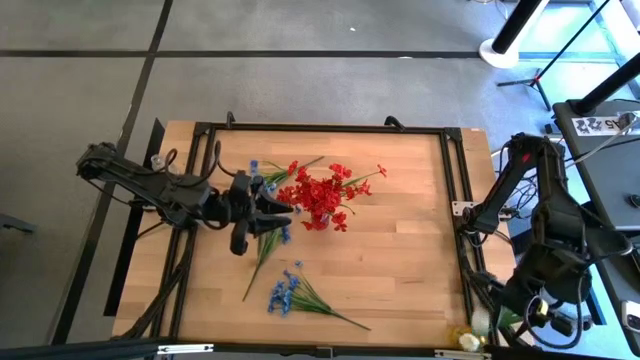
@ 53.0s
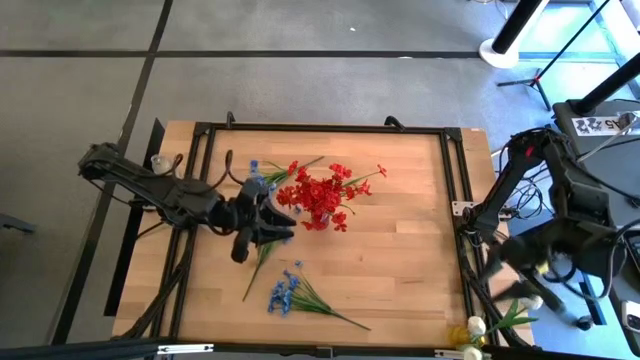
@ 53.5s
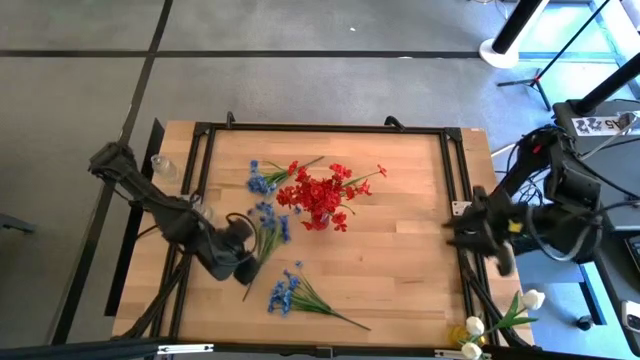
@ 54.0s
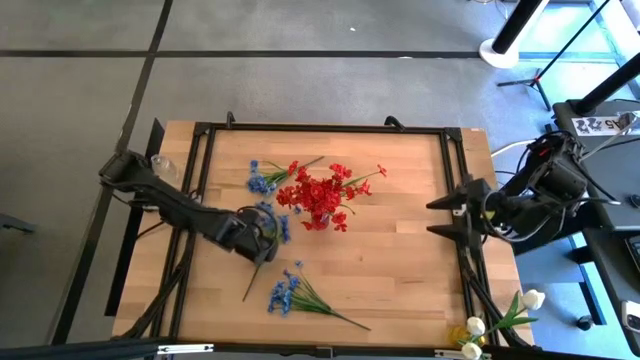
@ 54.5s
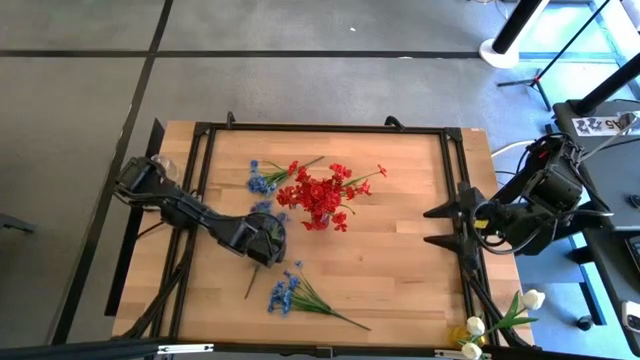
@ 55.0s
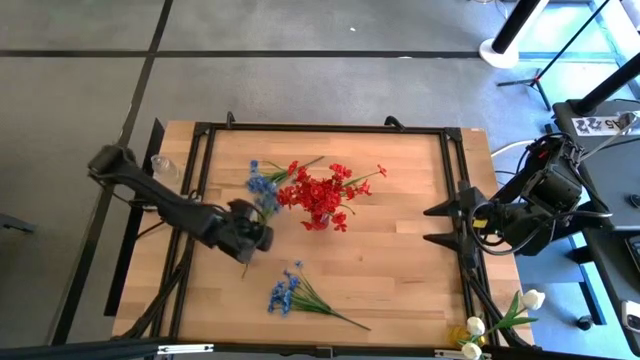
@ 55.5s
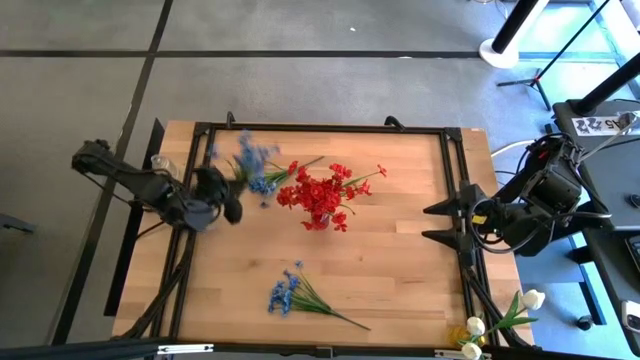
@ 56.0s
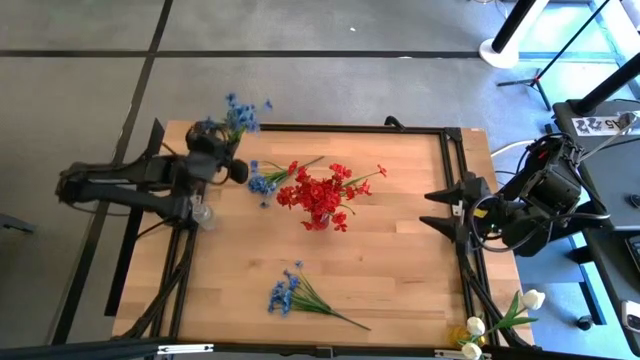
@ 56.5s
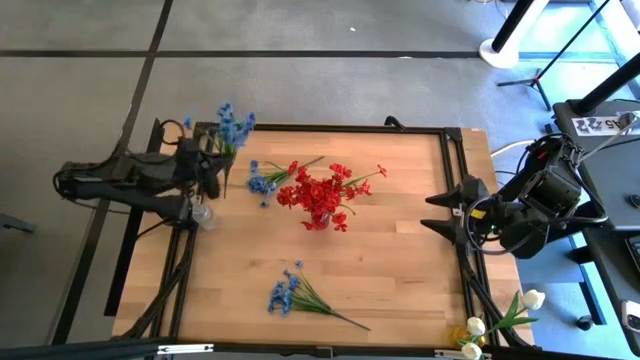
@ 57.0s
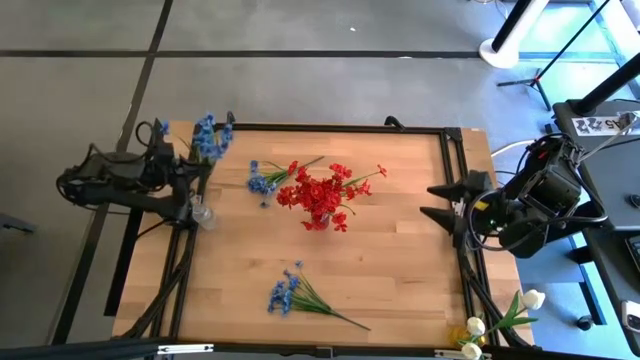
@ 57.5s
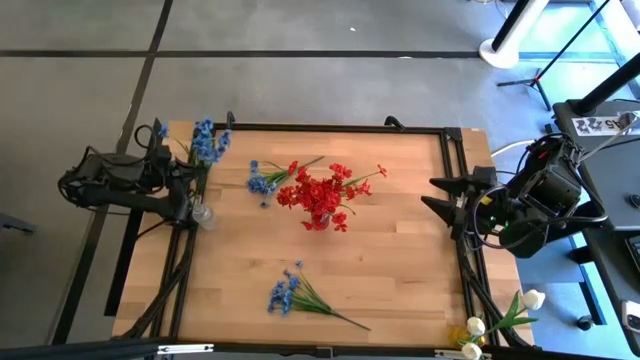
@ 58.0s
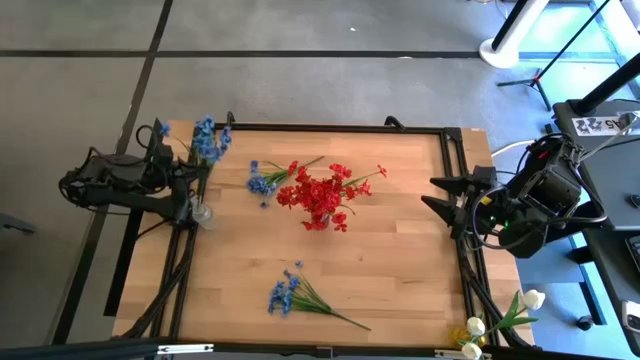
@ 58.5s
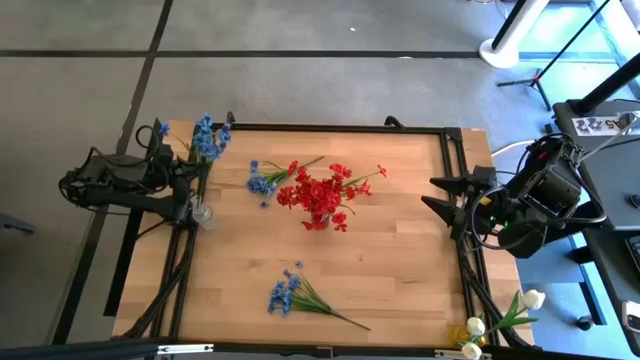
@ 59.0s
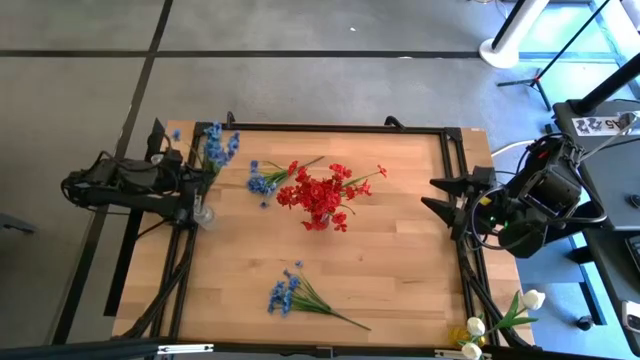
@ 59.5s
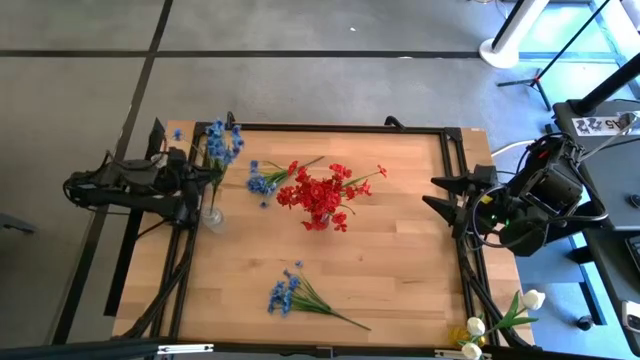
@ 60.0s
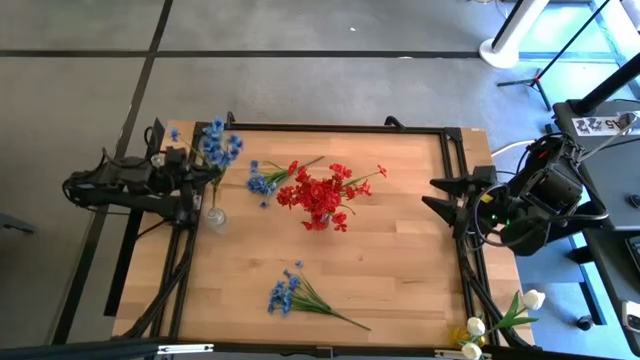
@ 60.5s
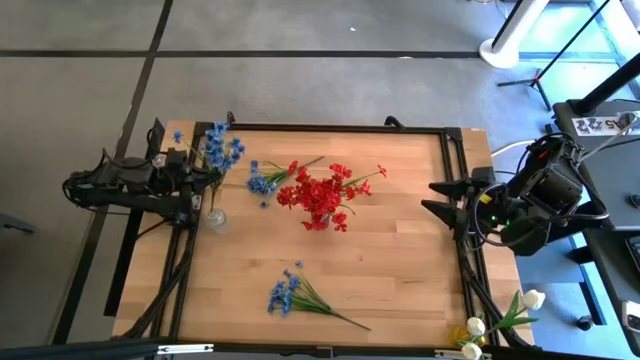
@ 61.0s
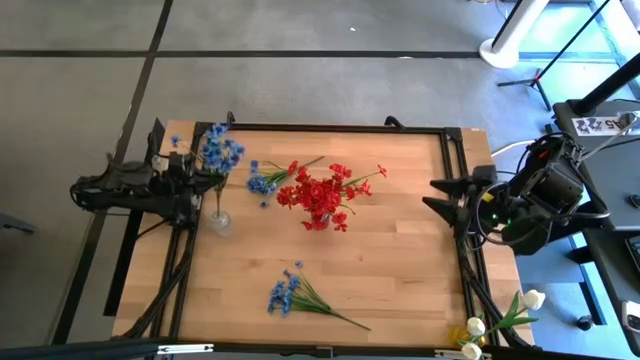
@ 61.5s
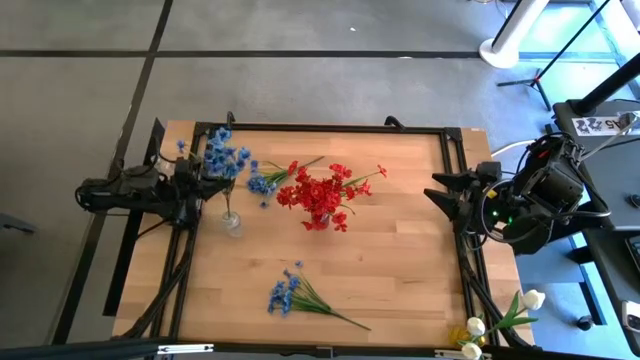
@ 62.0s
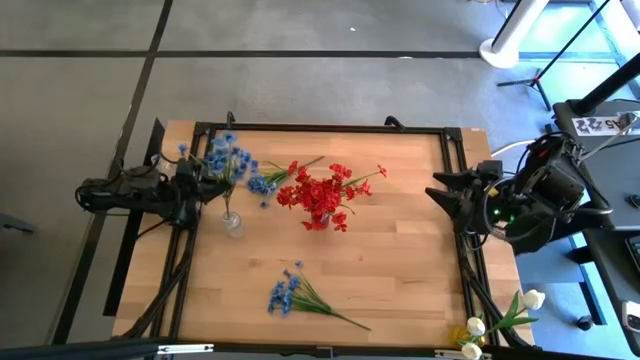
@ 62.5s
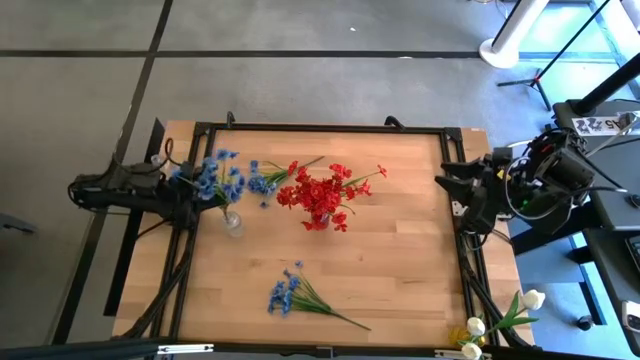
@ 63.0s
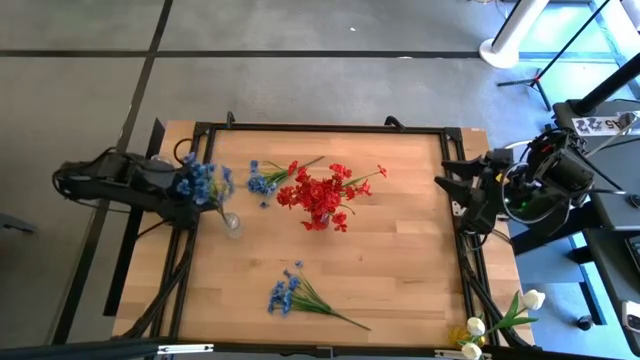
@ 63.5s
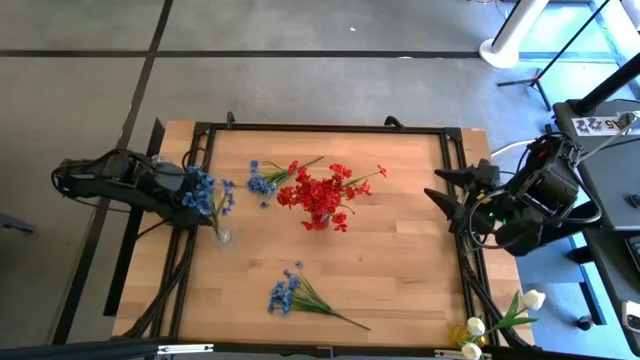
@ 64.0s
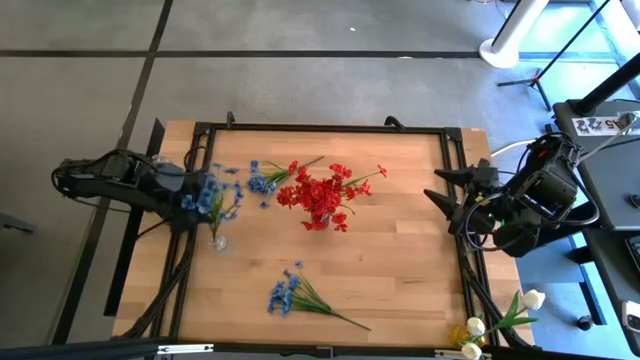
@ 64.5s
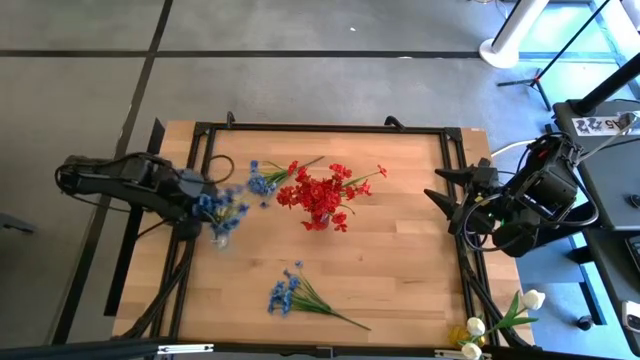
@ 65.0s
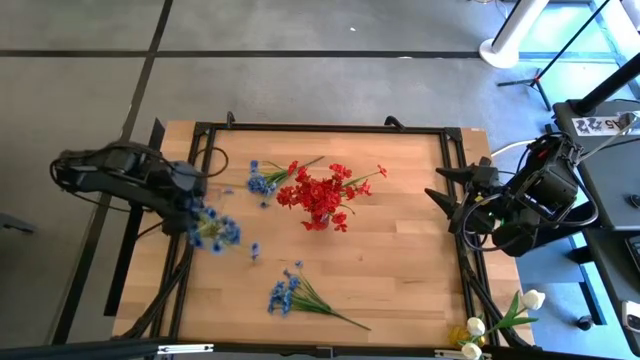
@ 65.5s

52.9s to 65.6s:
Task: Sort flowers into vase by color
Put the middle blue flowers into the transparent vase

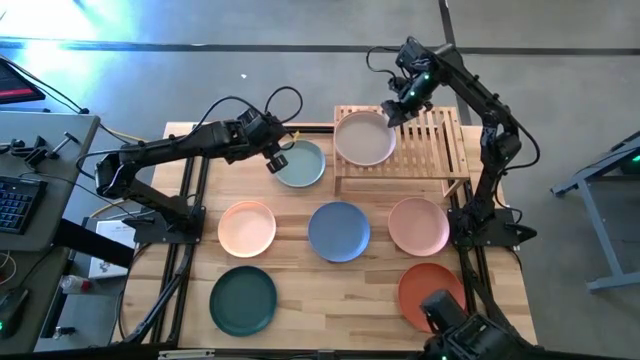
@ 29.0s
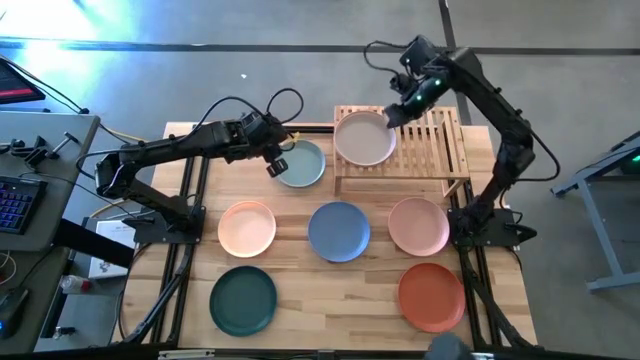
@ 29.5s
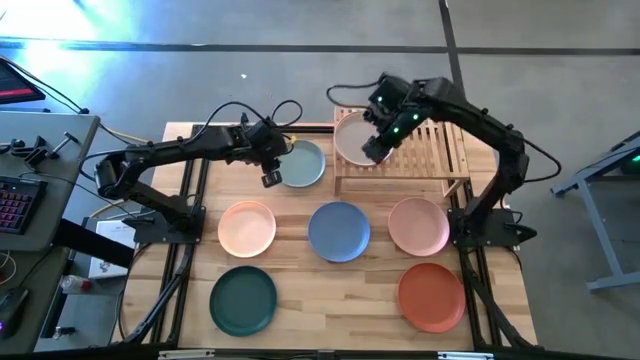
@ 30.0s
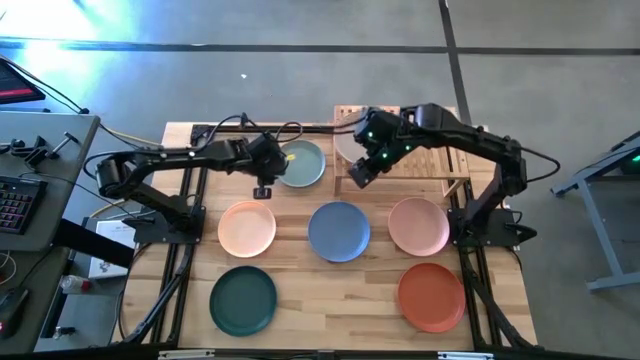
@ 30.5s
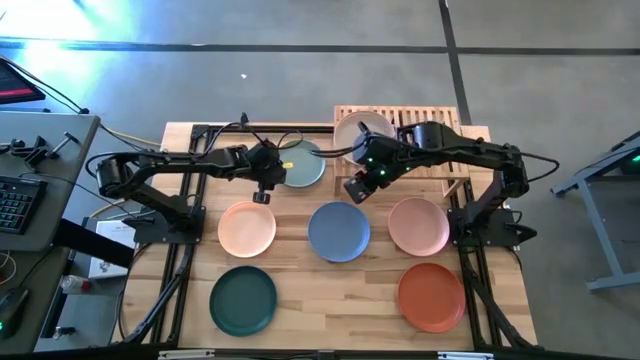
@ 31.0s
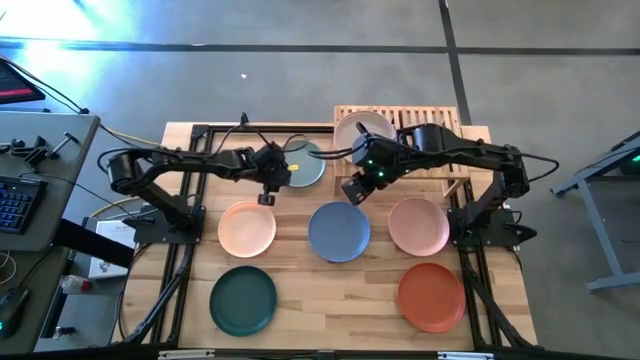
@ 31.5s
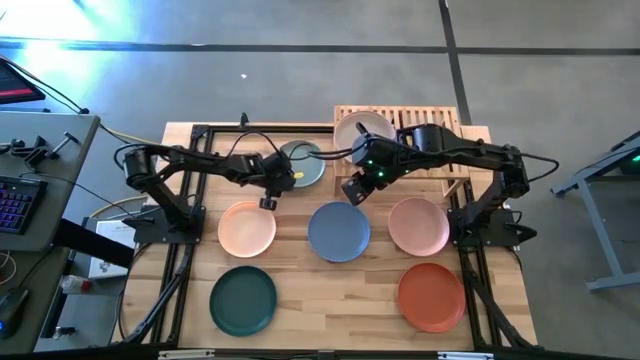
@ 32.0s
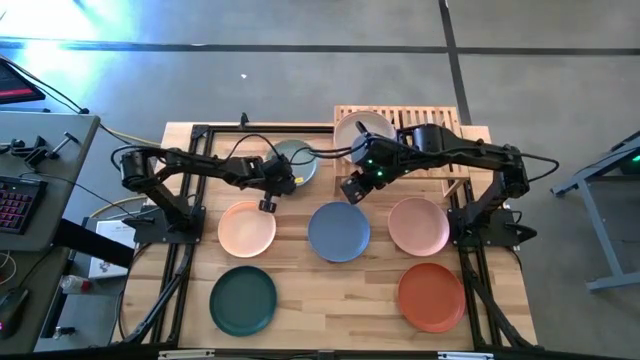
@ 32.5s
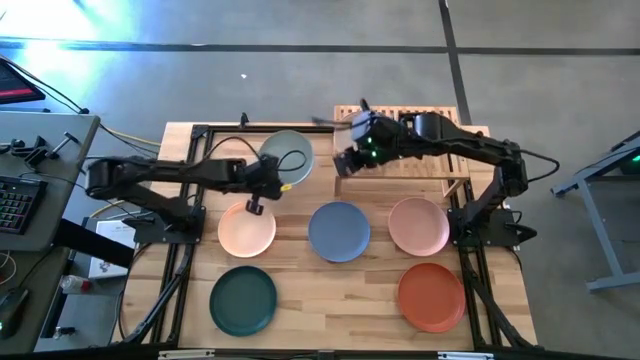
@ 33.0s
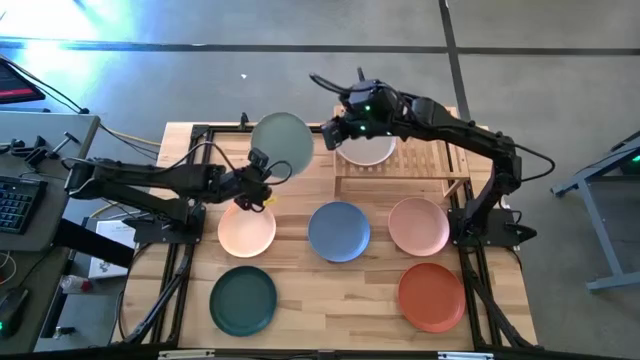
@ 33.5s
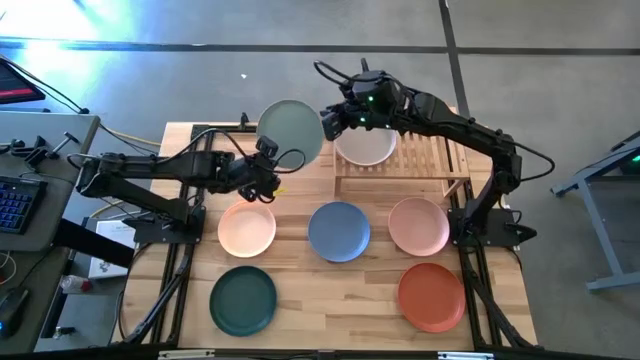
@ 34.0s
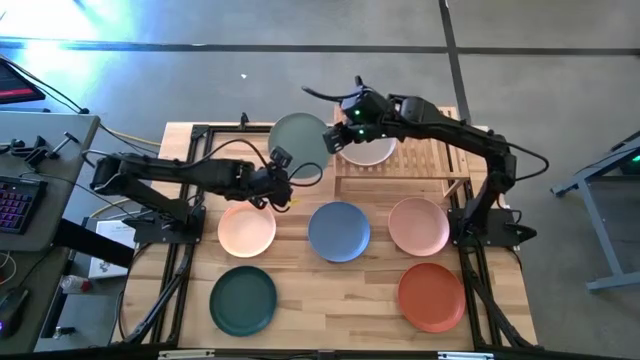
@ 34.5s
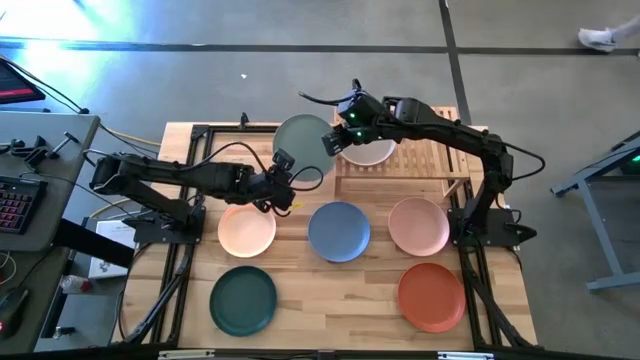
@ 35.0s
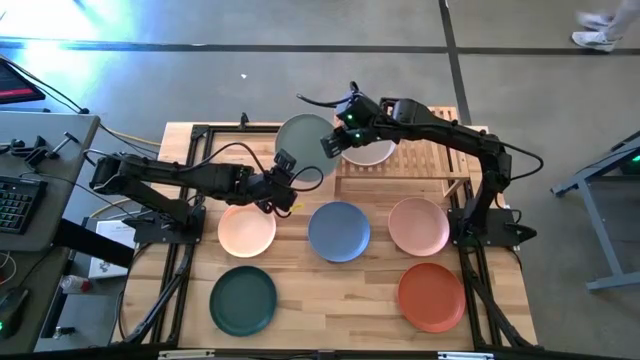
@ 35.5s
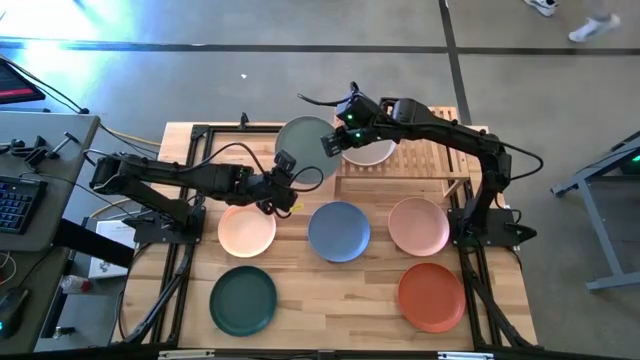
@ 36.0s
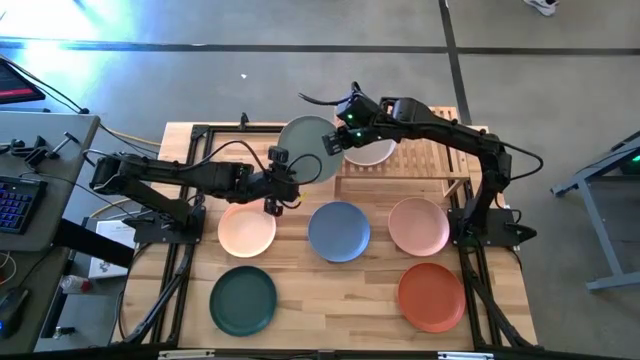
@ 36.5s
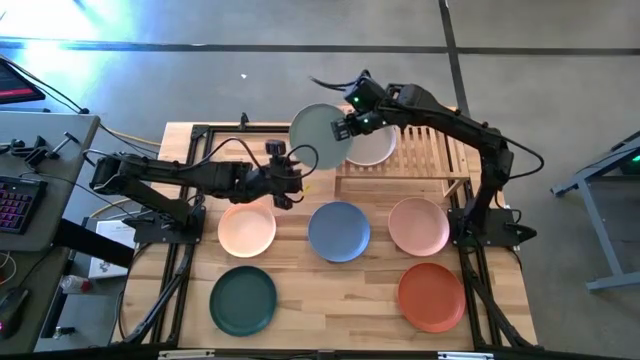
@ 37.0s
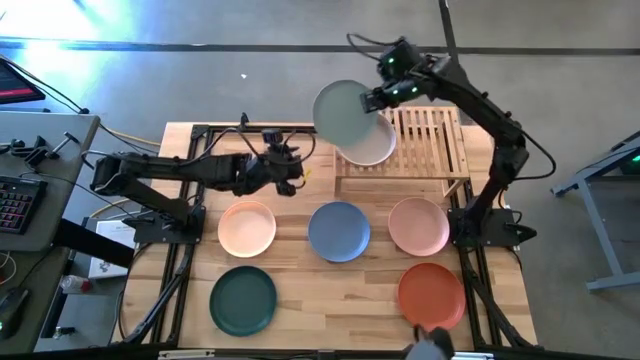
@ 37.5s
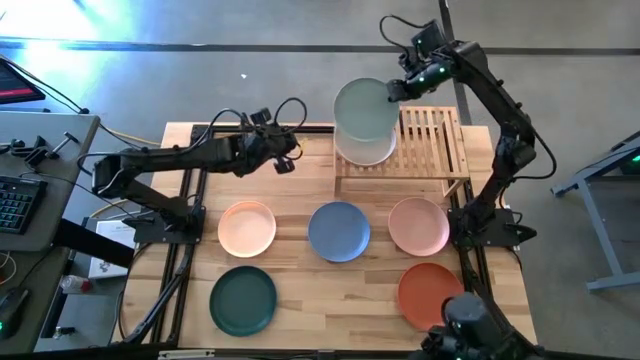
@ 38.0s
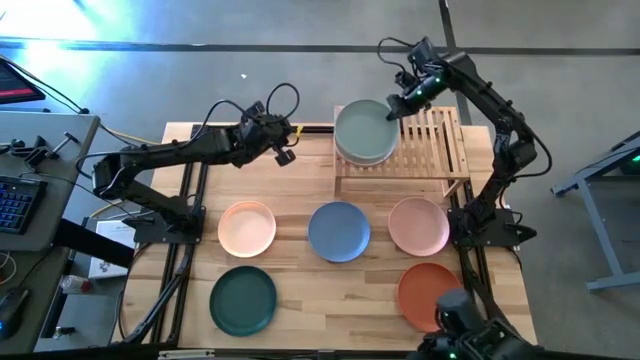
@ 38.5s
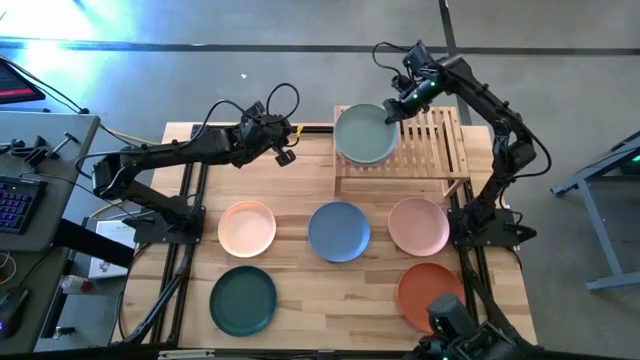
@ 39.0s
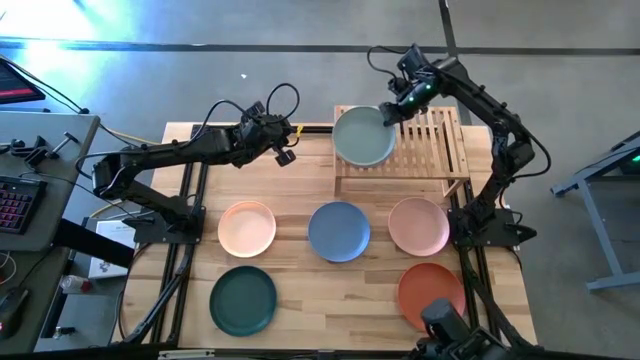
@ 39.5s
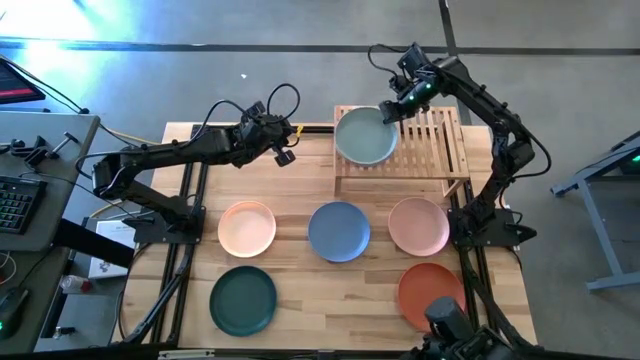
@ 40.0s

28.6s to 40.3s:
Task: Place and stack plates onto a shelf
Stack the gray plate on top of the white plate on the shelf
